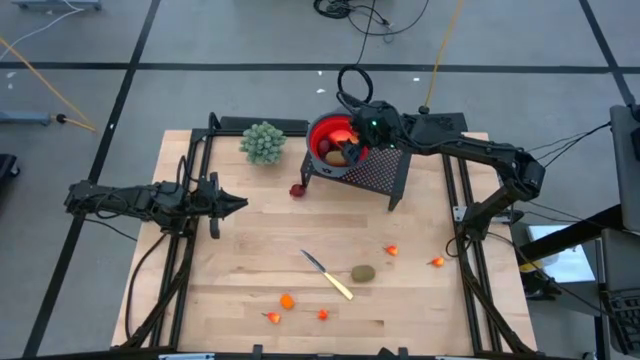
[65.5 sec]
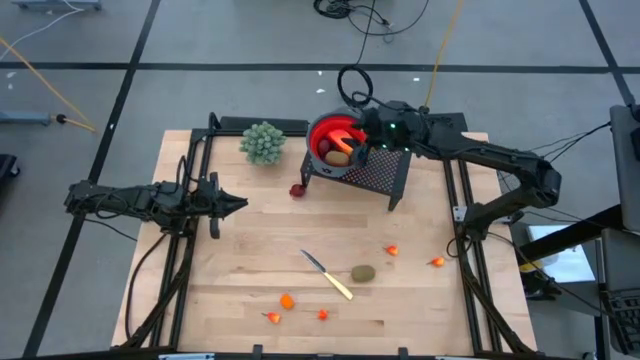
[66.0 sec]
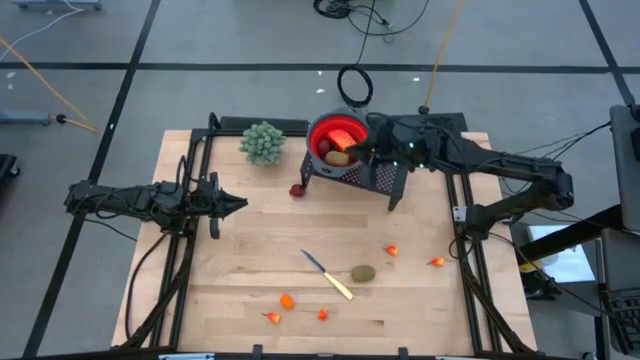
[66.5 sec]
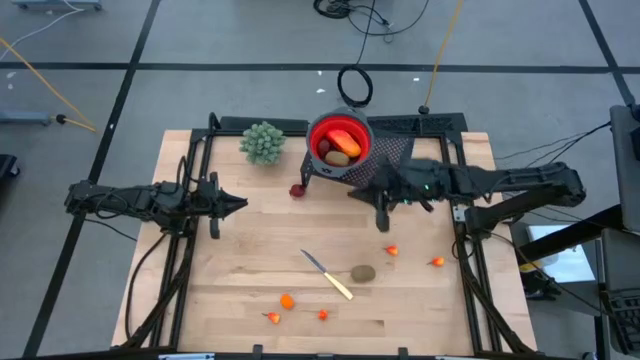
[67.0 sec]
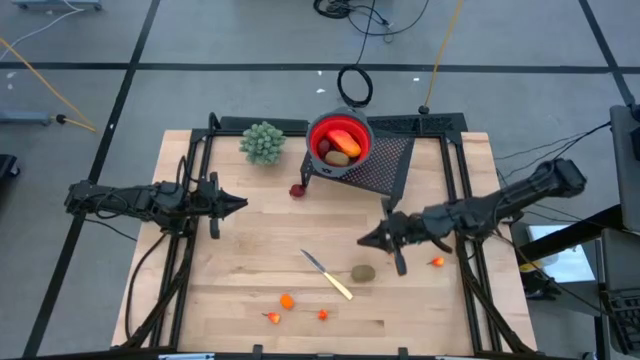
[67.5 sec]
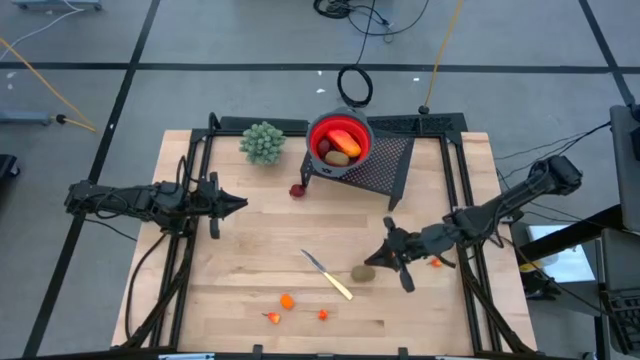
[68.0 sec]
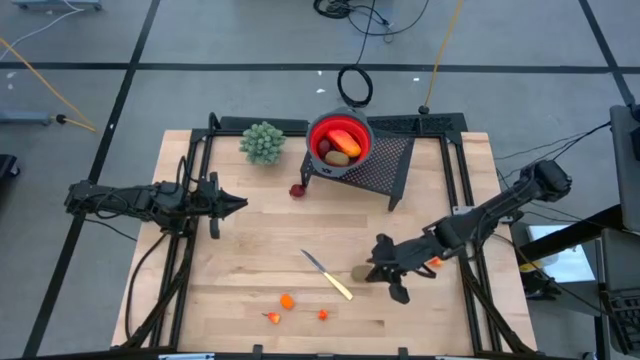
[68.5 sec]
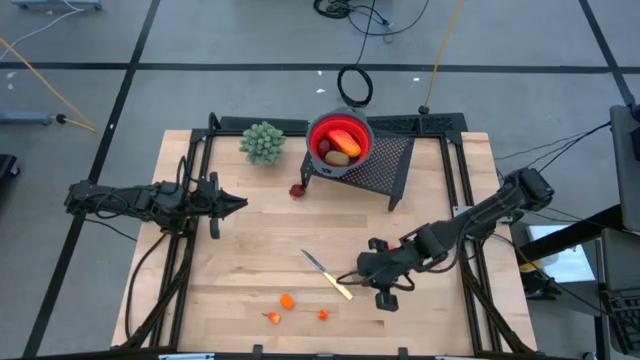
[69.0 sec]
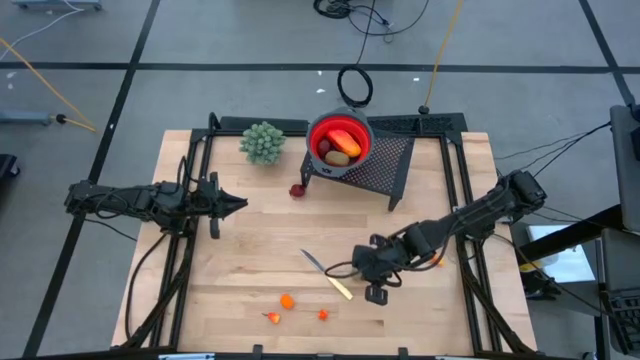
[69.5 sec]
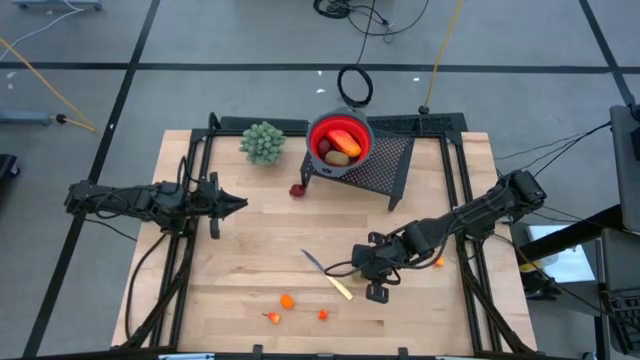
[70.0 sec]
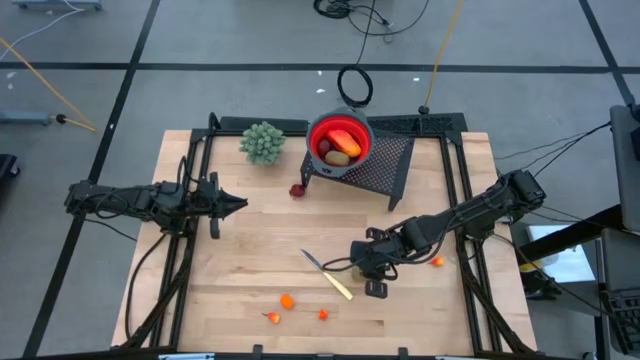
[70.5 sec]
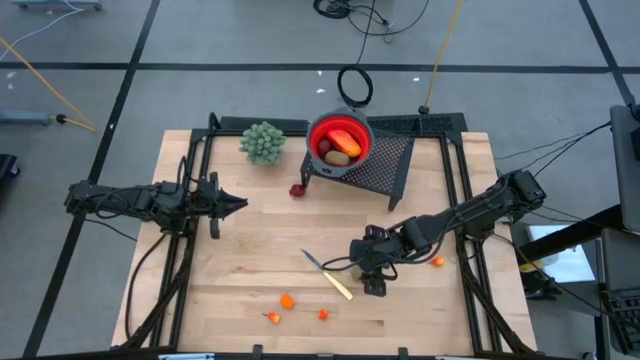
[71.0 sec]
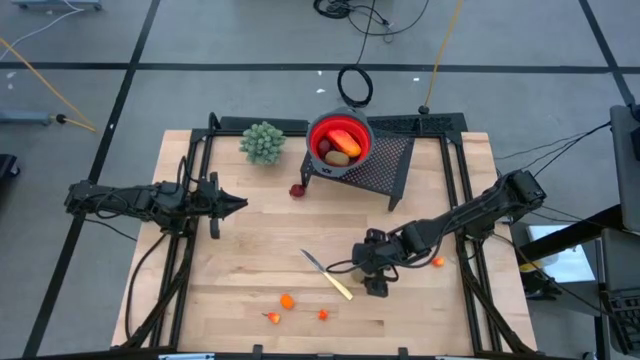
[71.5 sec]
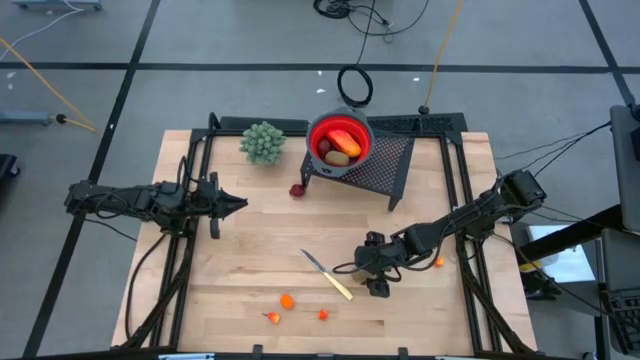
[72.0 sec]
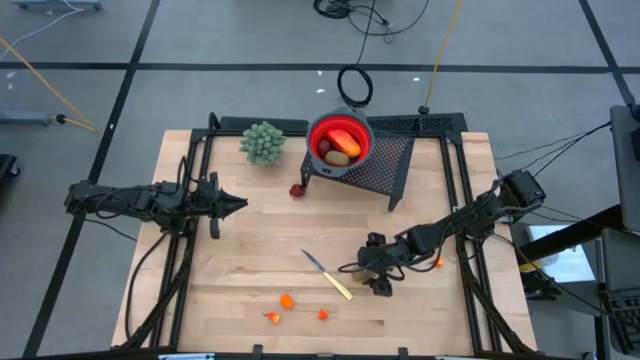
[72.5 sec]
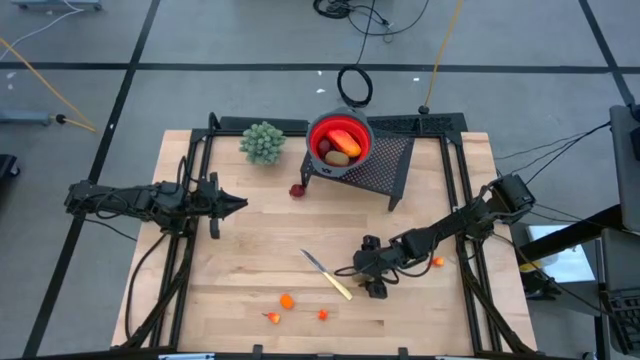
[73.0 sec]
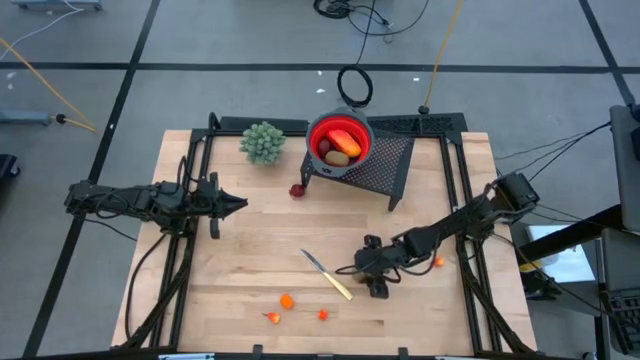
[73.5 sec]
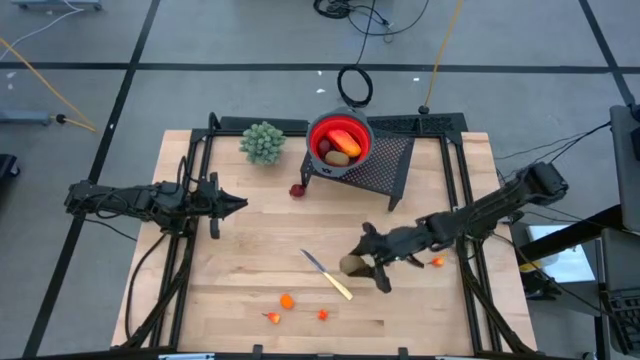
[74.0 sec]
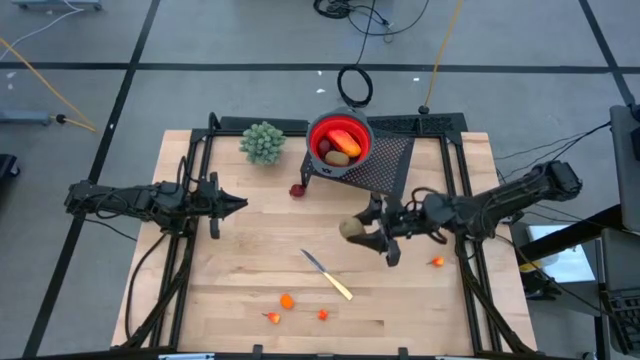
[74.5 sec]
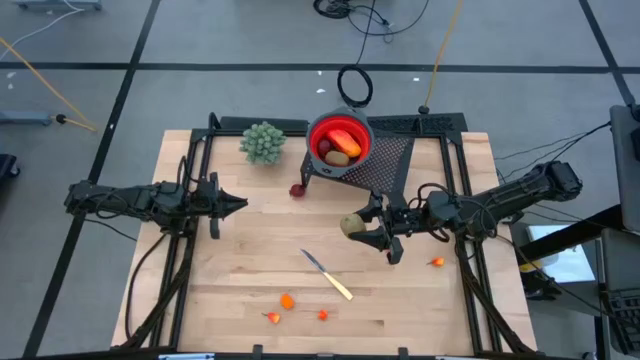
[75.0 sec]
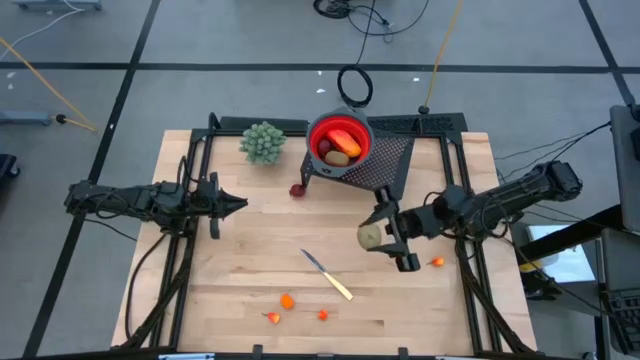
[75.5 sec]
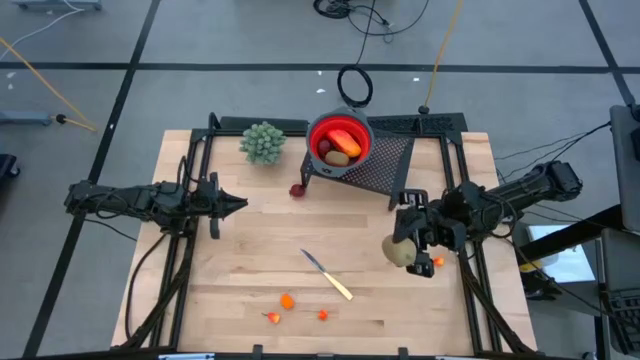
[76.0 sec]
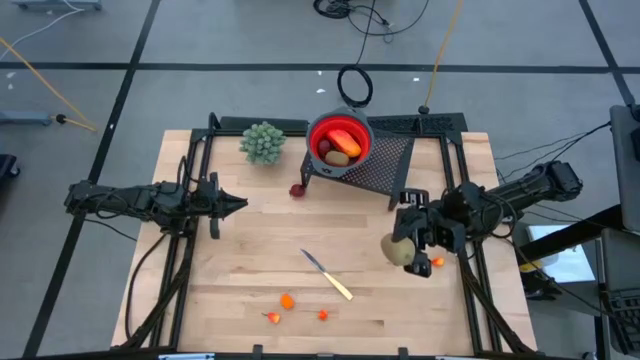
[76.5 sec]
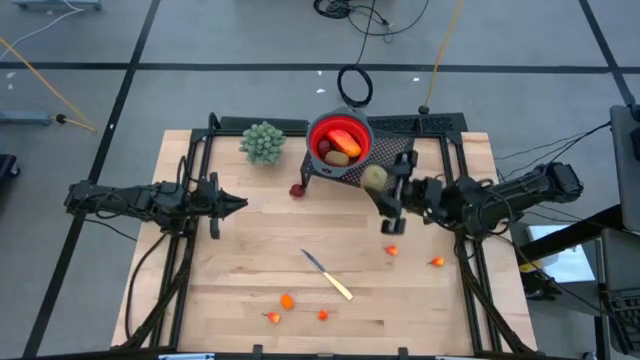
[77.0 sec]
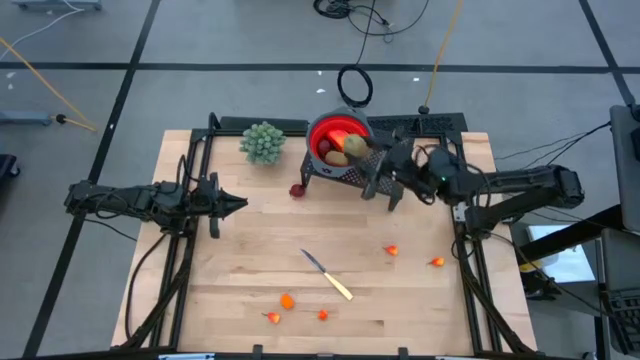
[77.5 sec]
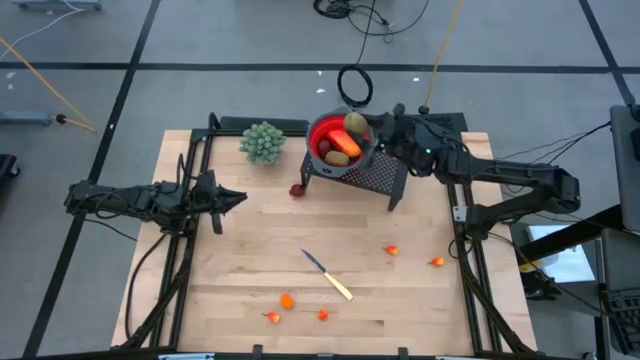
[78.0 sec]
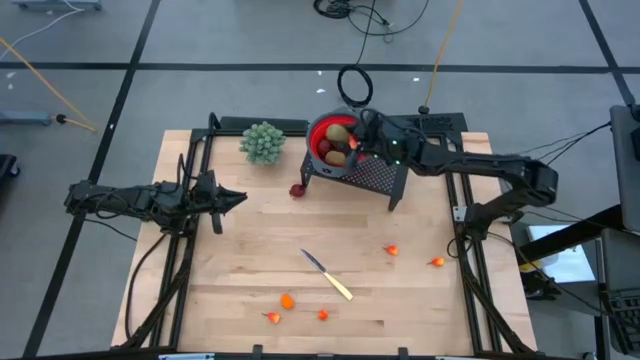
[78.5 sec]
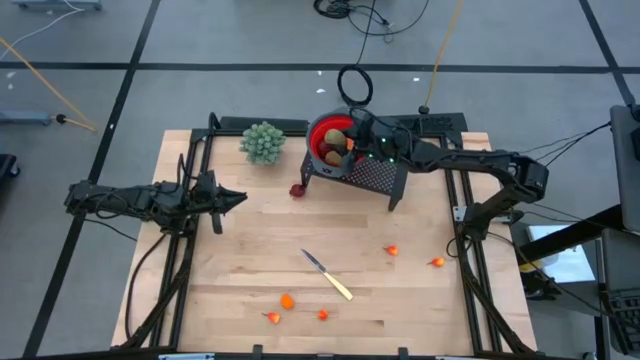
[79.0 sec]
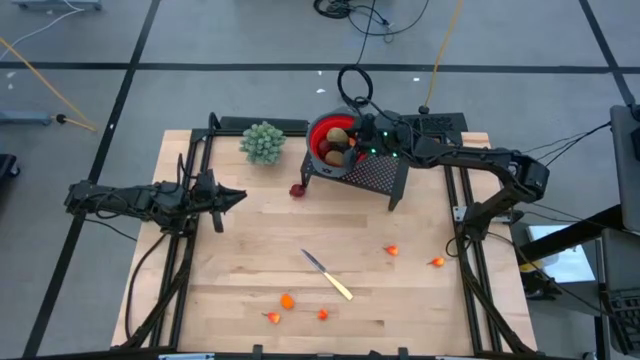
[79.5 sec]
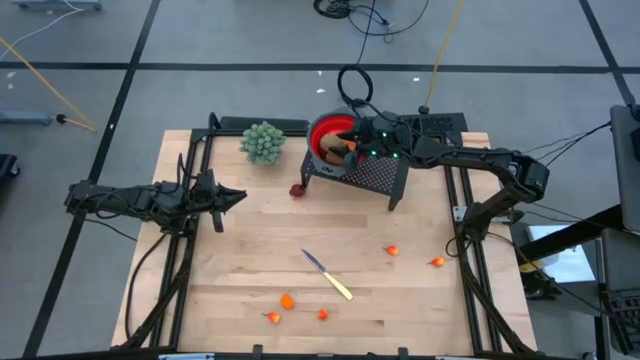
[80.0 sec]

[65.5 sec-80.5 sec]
Task: Pick & Place Fruit
Put the brown kiwi into the red strainer bowl on the shelf

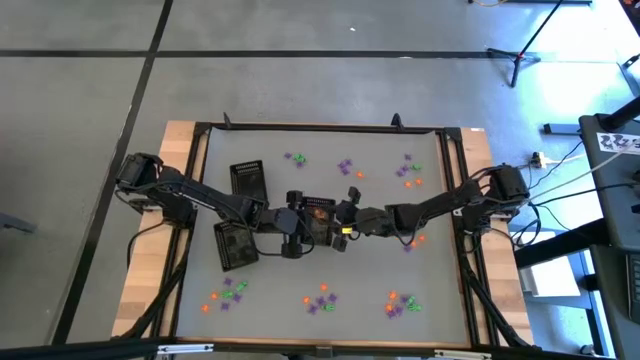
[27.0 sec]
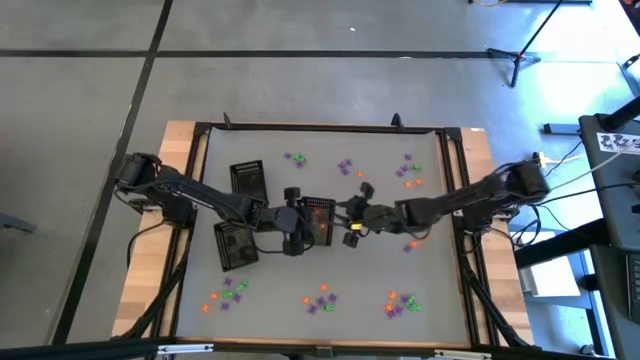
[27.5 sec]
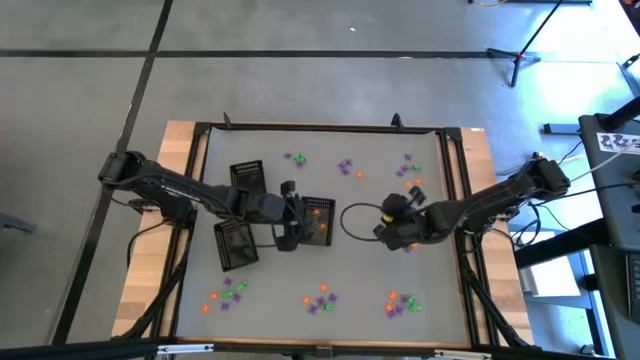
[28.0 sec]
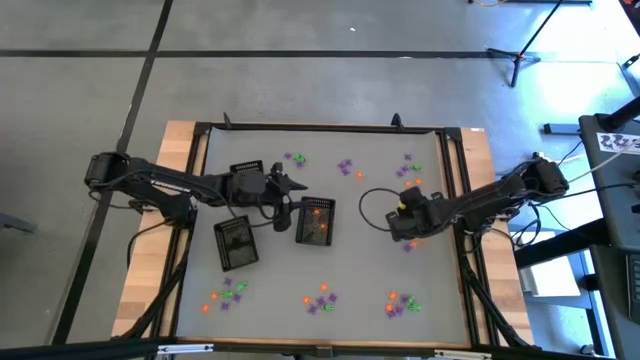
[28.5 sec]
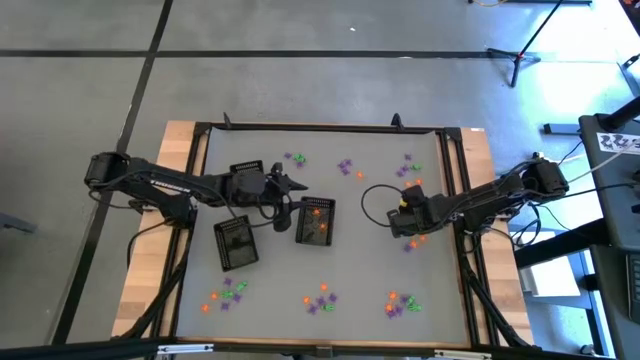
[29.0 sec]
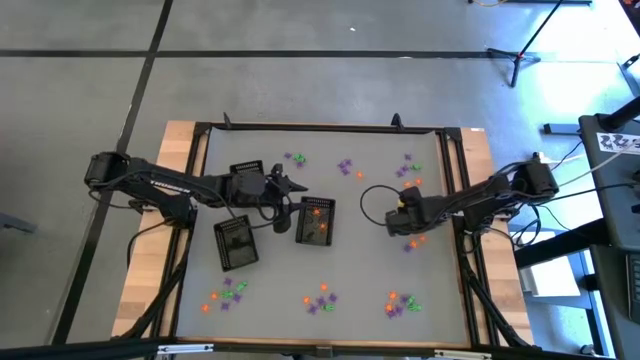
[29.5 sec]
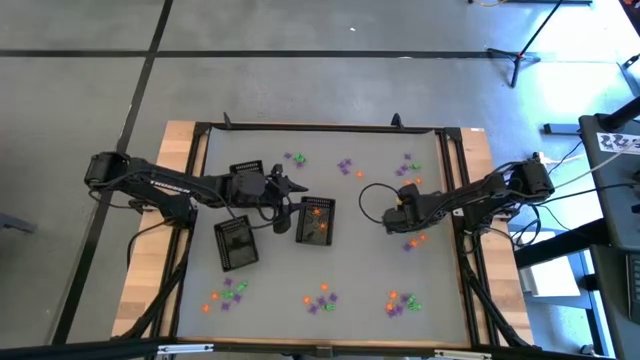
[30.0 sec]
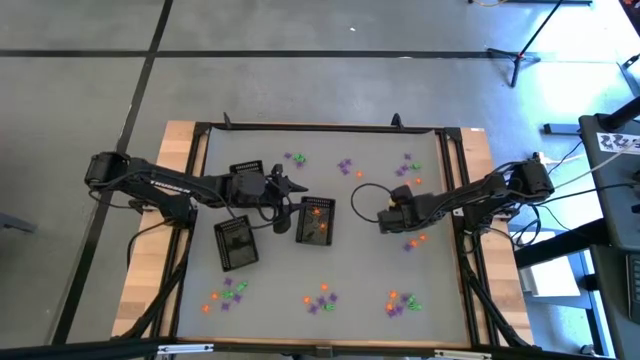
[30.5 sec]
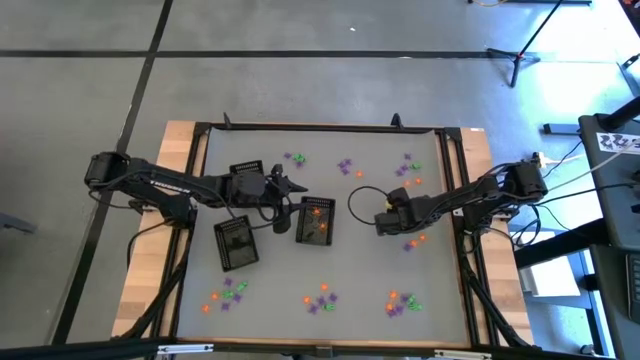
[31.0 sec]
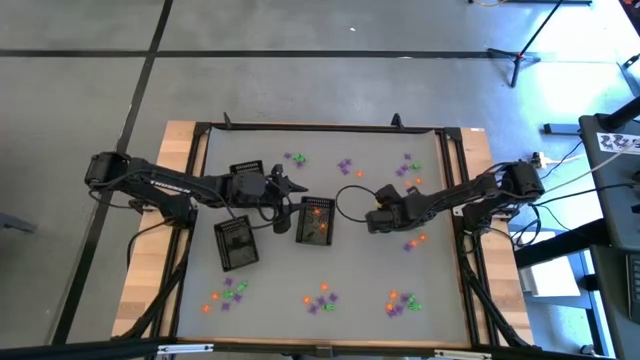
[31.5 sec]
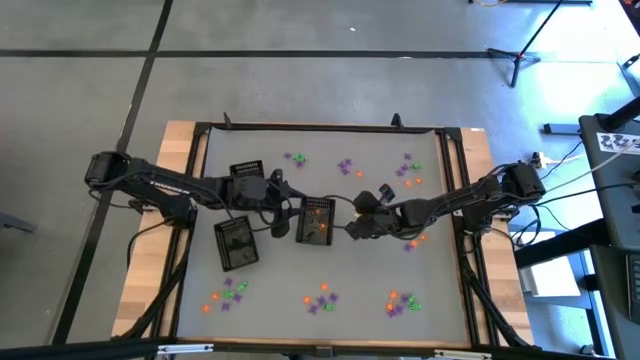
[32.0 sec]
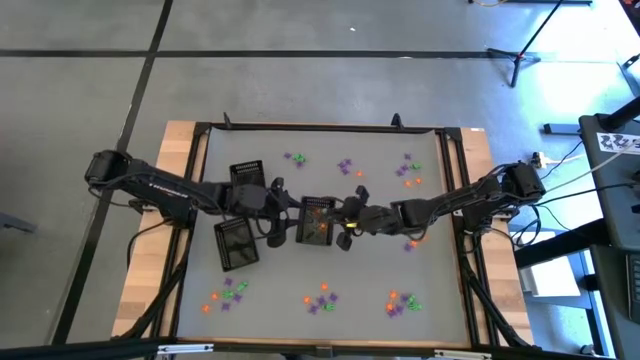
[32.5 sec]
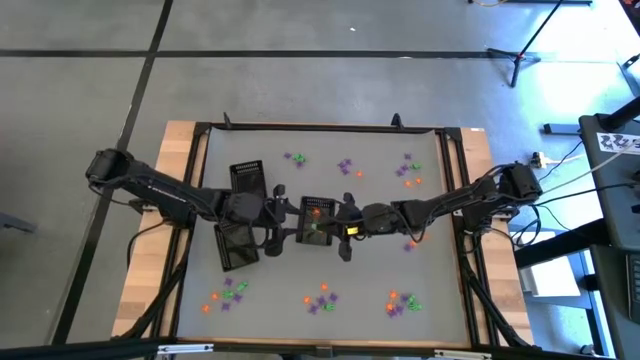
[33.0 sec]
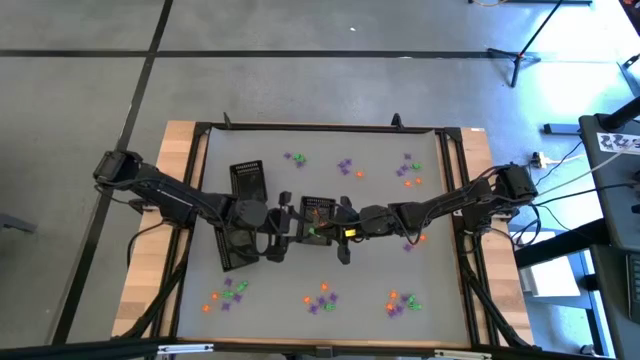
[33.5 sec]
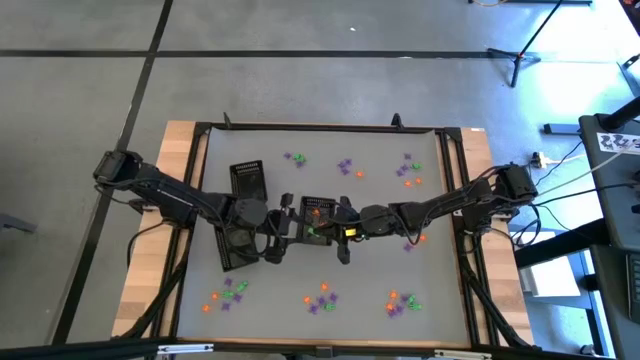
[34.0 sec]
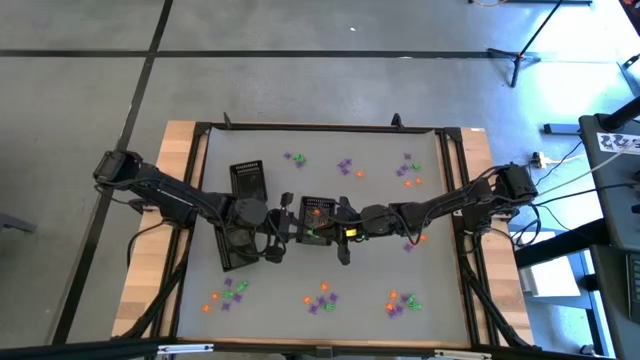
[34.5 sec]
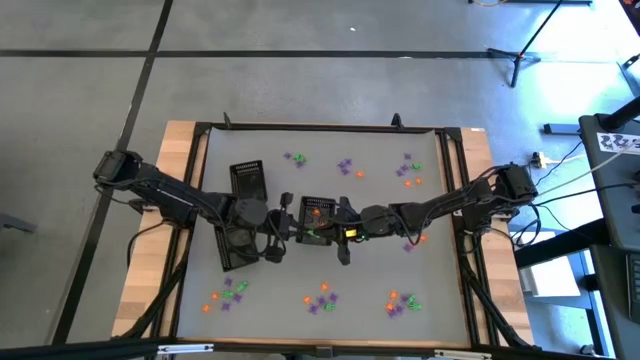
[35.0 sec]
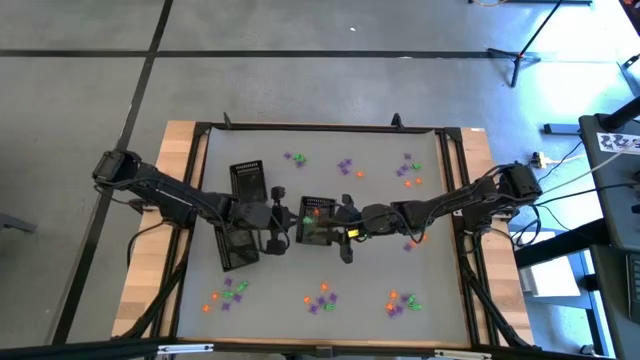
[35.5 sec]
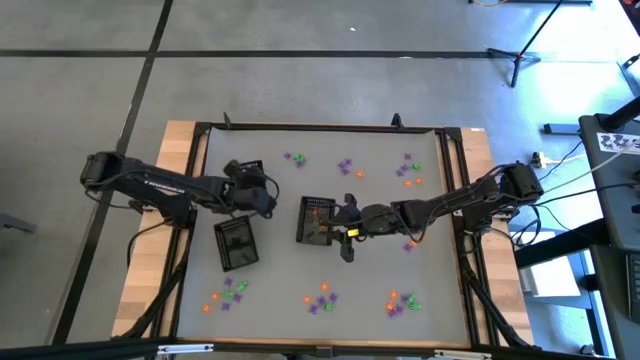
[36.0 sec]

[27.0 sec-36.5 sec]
Task: Sort Halloween decoration
Put the green alien toy into the top left black basket
